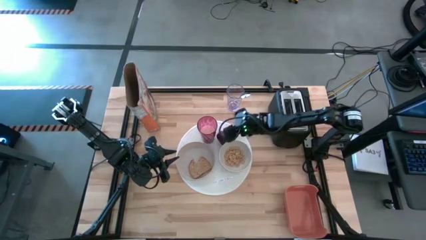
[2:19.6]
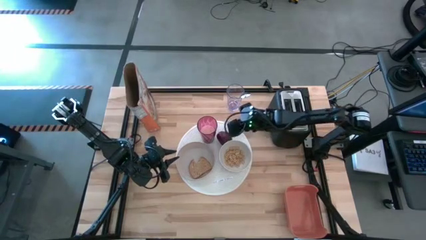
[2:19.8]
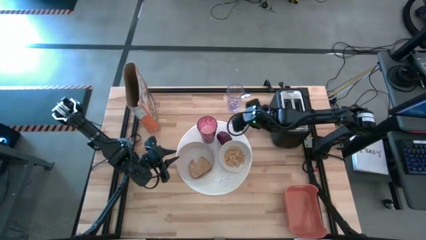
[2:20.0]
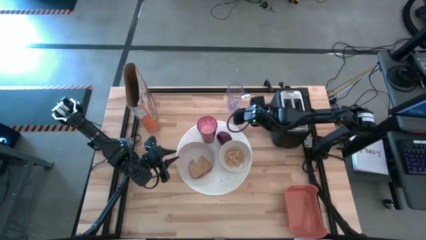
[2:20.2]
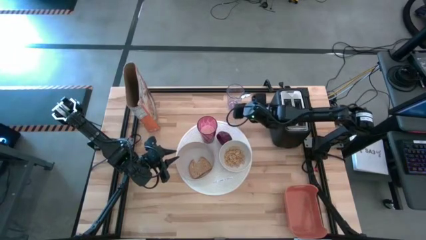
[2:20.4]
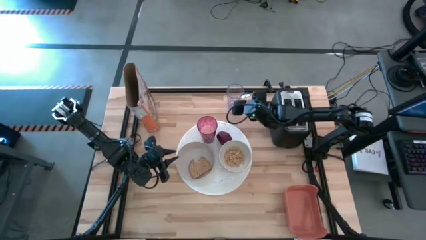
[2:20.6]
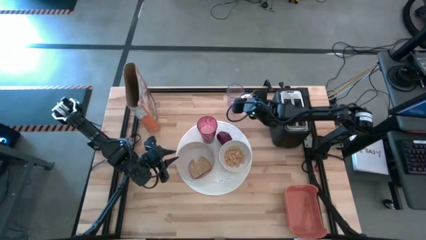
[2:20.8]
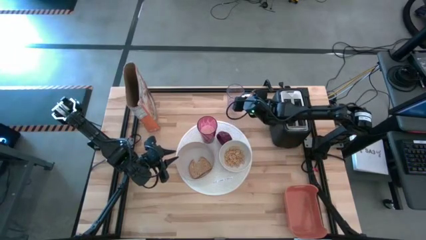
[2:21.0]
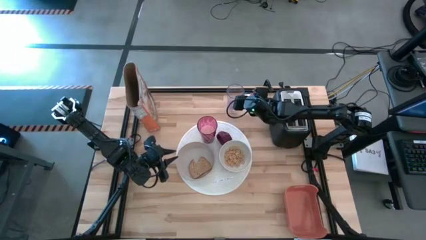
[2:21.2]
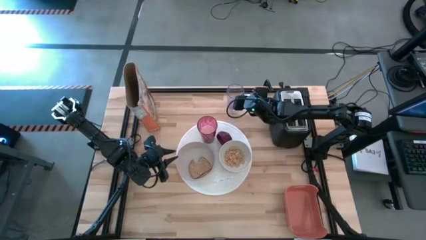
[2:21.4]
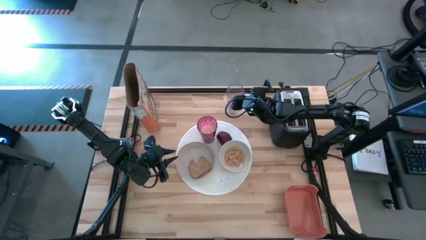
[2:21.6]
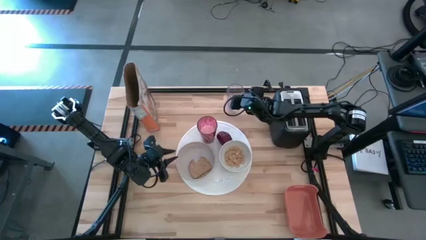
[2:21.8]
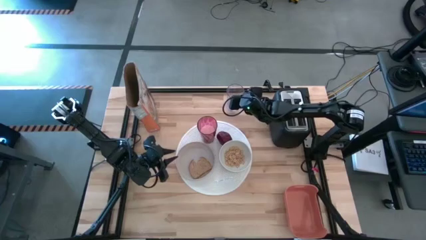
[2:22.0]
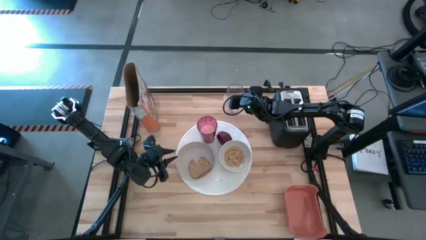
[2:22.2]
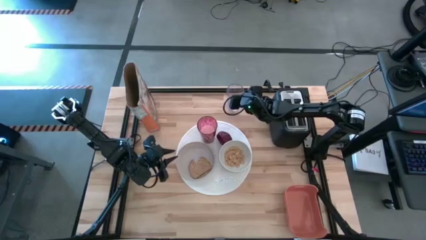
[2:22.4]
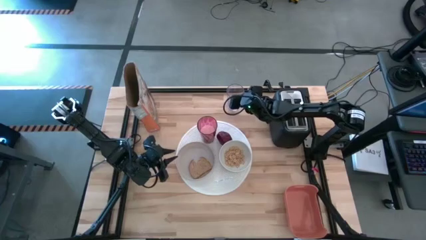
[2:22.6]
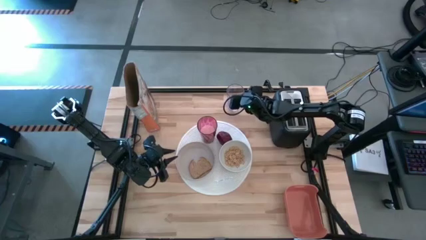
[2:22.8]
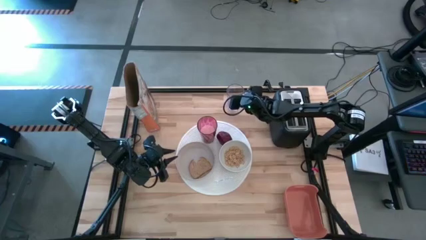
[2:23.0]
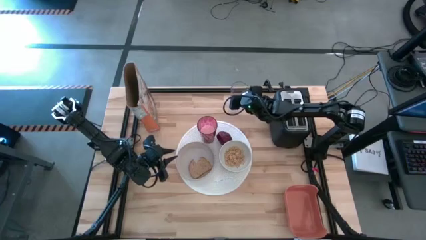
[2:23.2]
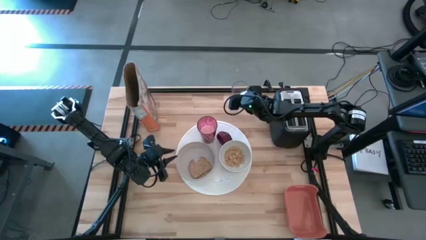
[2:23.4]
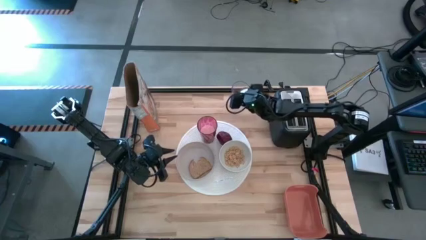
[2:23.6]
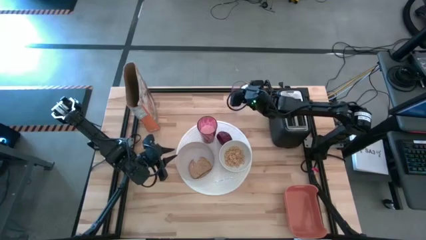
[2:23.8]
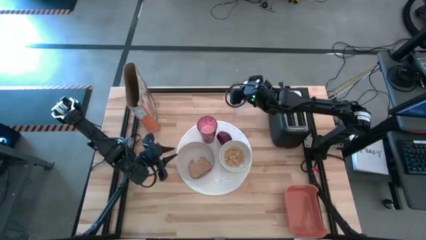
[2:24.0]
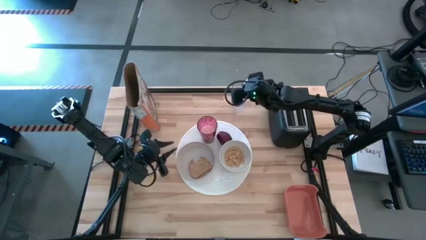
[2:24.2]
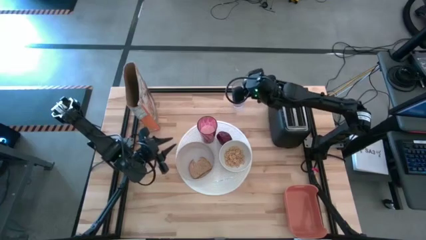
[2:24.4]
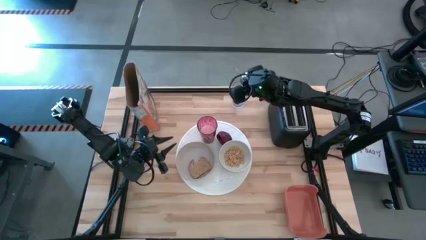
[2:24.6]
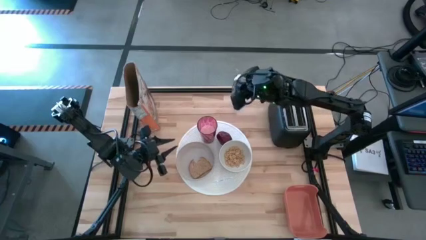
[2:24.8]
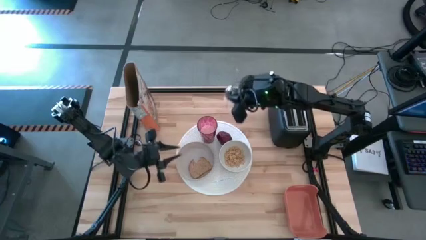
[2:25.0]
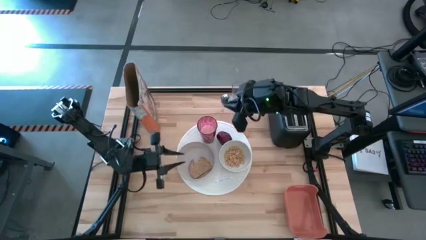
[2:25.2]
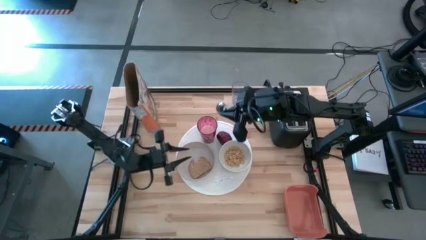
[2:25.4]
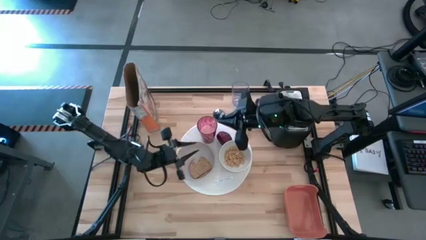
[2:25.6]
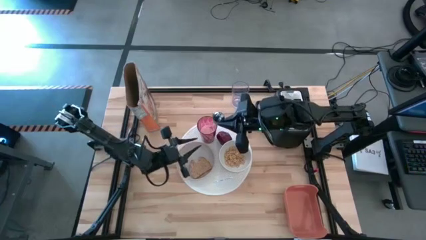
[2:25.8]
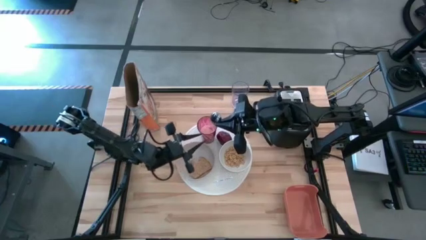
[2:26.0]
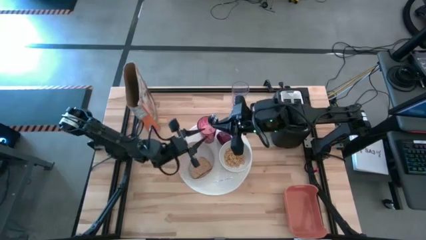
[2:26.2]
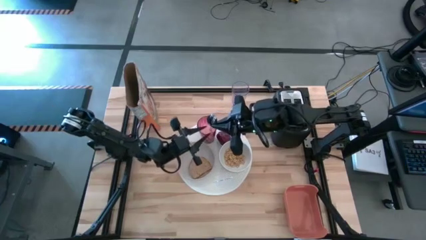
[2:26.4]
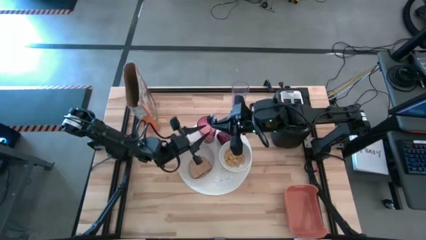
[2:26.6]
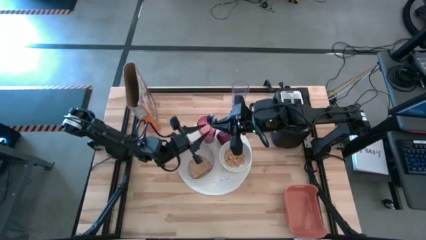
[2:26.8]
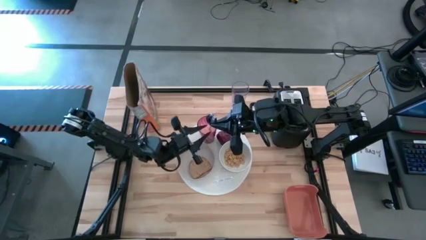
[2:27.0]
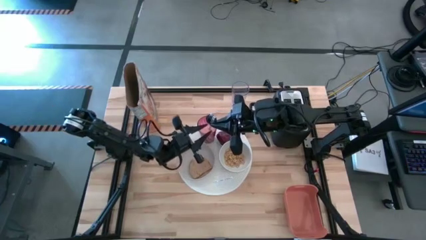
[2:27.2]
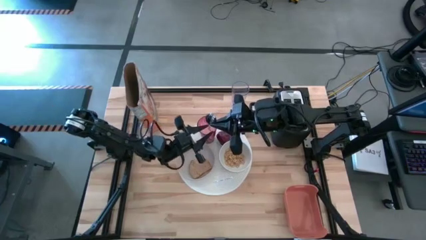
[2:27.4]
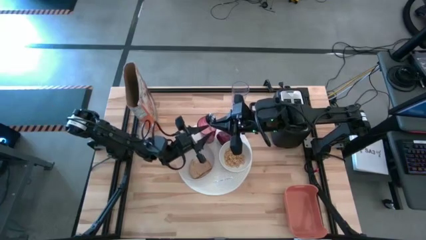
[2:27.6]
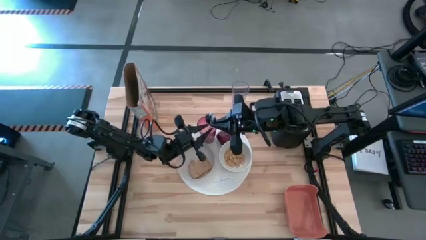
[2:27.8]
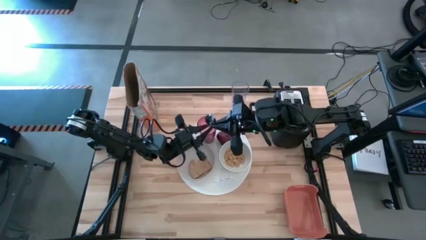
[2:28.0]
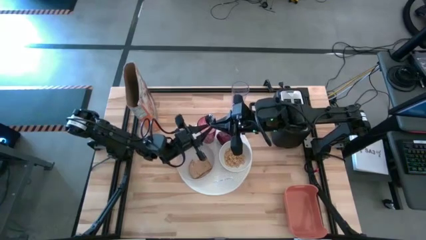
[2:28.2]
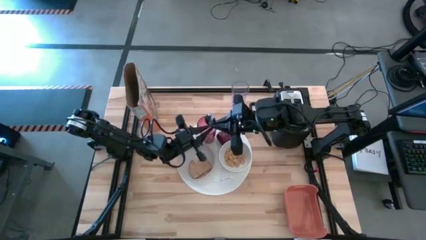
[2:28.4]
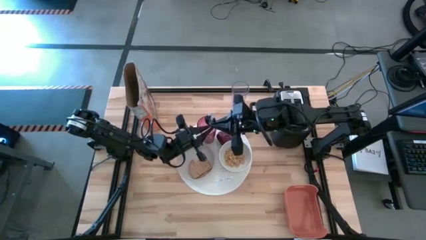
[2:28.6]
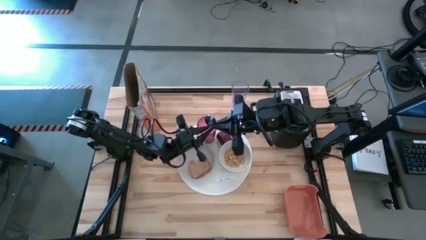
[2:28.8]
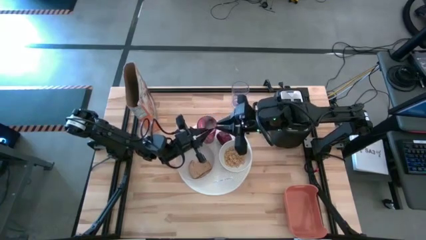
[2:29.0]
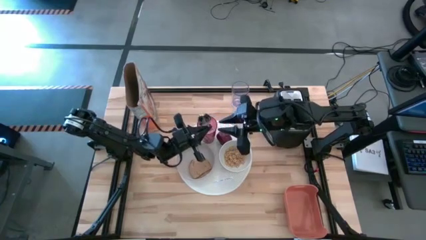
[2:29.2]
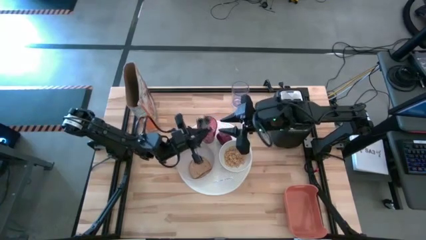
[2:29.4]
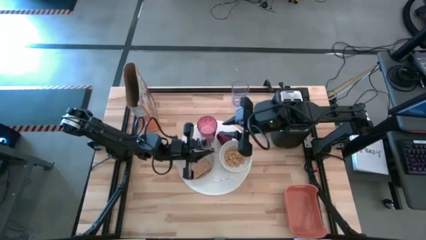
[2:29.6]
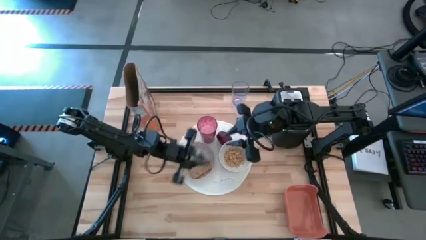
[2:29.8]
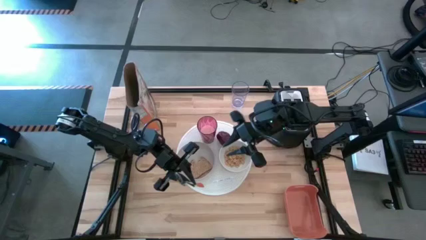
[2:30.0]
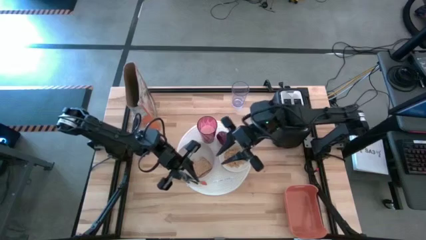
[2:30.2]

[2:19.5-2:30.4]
Task: Arrange a breakfast setting
Put the orange spoon on the table to the right side of the white bowl

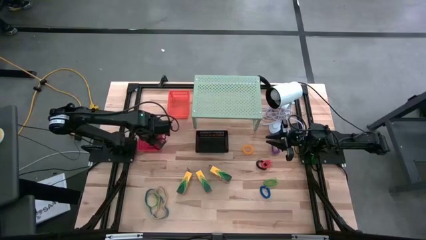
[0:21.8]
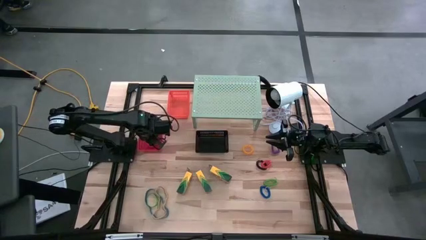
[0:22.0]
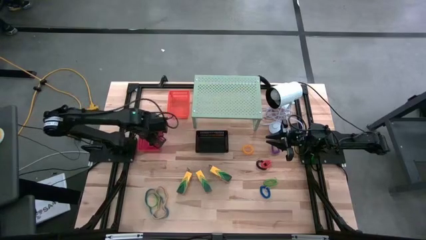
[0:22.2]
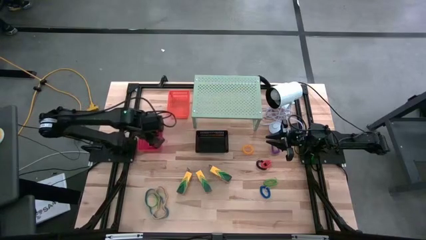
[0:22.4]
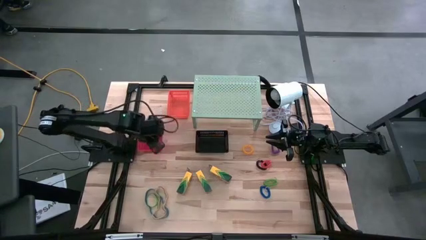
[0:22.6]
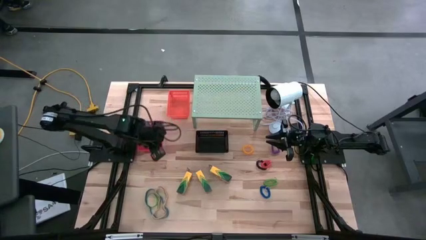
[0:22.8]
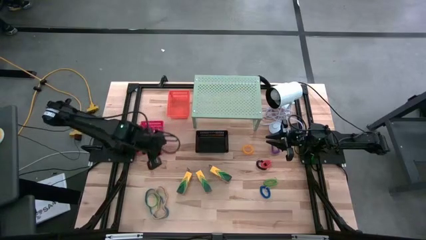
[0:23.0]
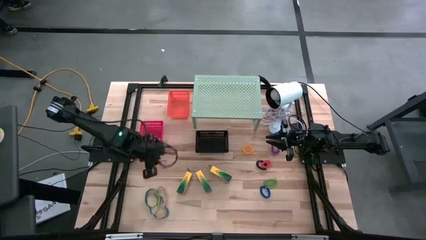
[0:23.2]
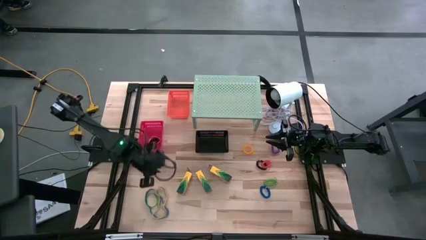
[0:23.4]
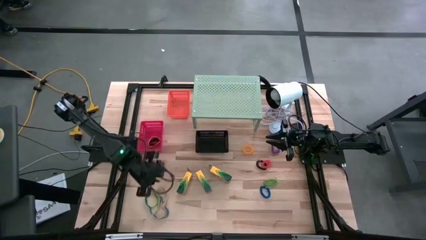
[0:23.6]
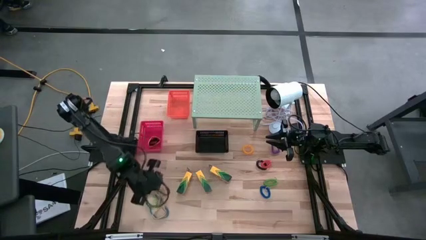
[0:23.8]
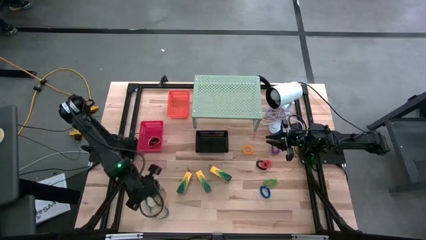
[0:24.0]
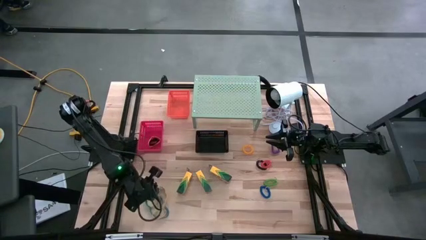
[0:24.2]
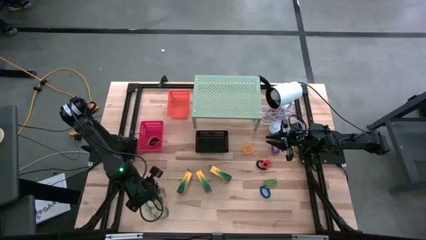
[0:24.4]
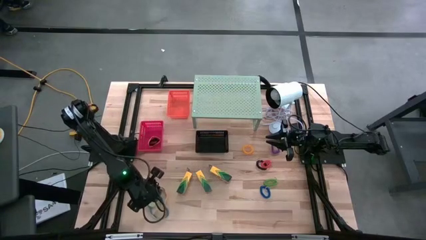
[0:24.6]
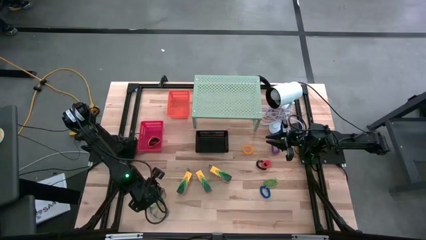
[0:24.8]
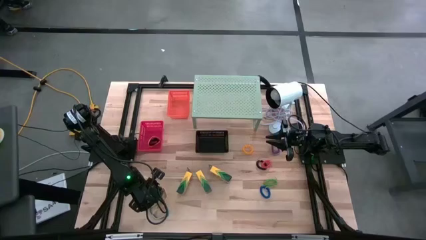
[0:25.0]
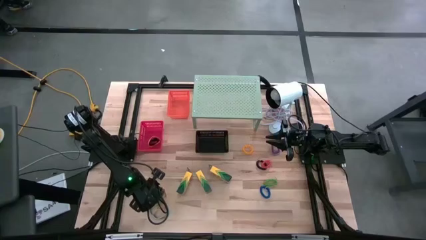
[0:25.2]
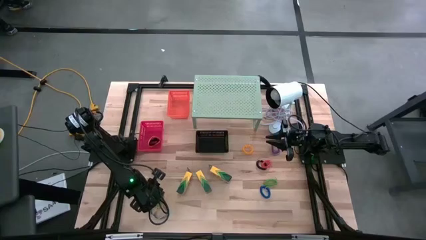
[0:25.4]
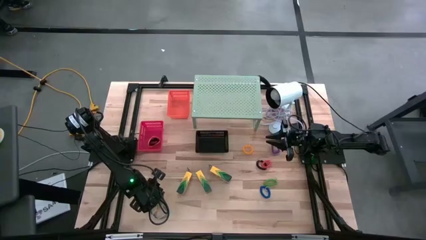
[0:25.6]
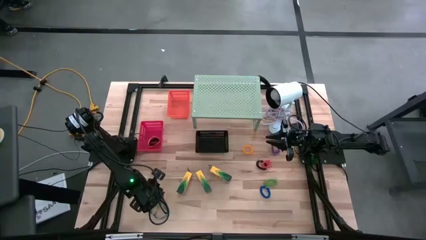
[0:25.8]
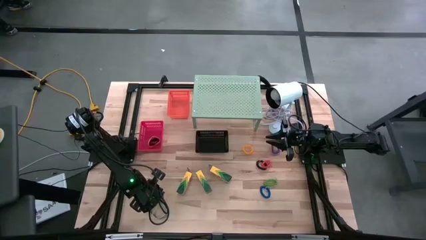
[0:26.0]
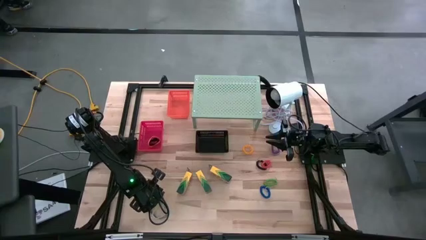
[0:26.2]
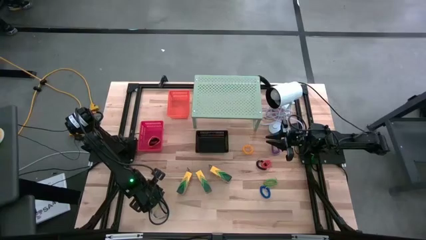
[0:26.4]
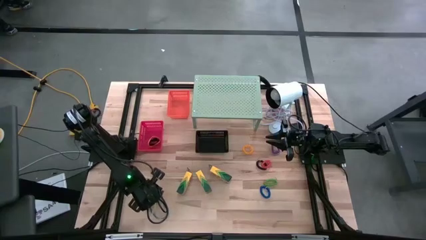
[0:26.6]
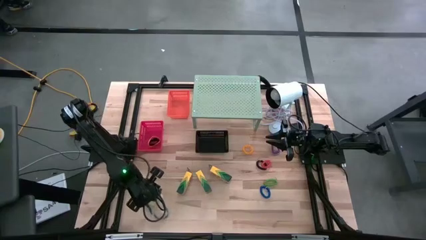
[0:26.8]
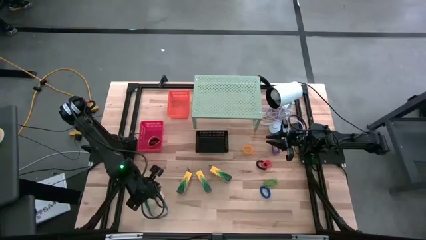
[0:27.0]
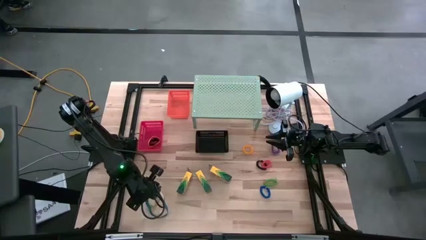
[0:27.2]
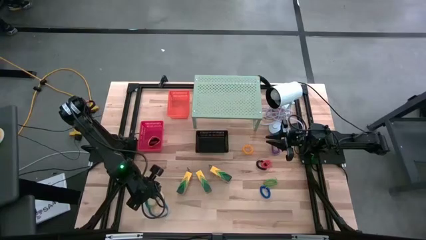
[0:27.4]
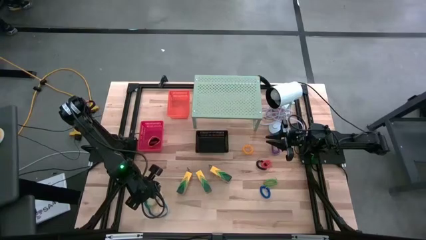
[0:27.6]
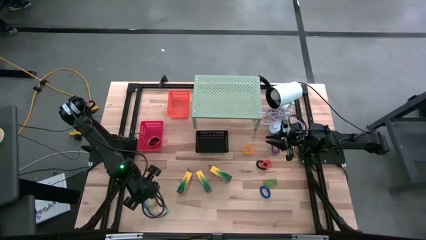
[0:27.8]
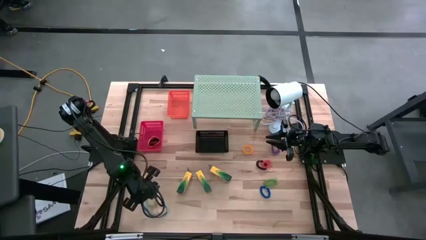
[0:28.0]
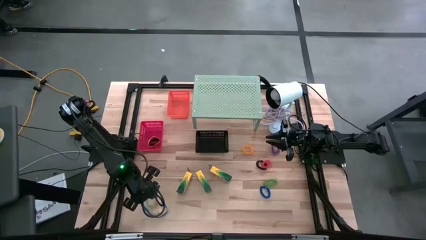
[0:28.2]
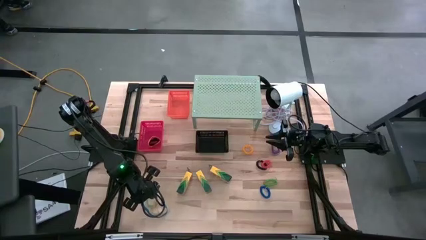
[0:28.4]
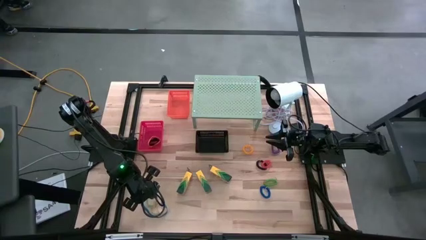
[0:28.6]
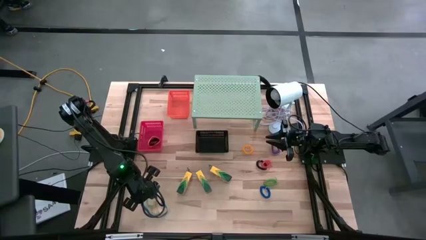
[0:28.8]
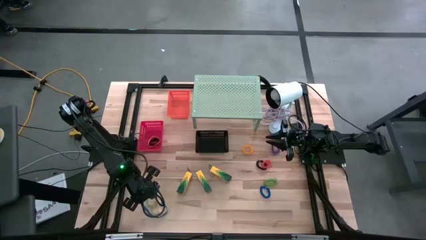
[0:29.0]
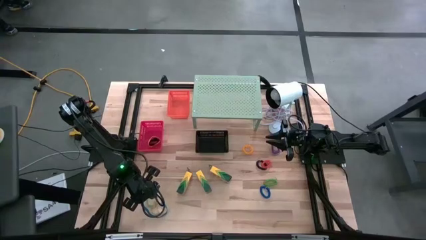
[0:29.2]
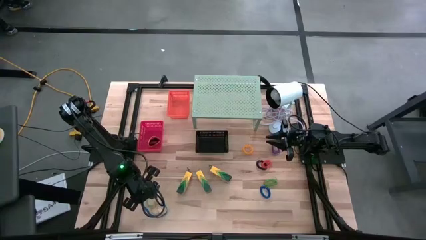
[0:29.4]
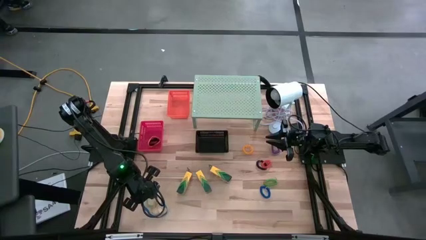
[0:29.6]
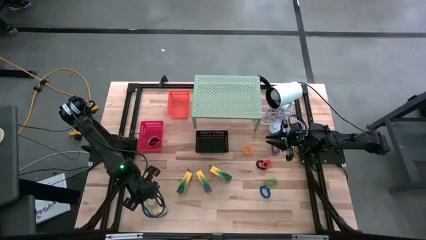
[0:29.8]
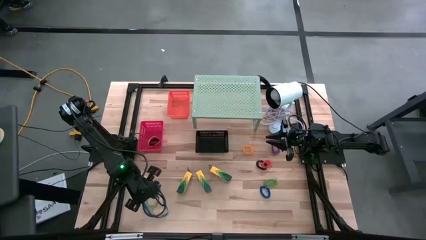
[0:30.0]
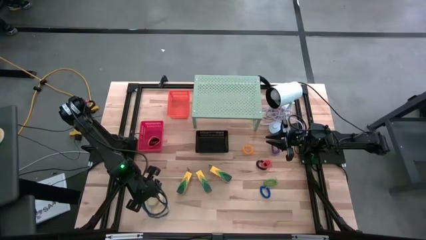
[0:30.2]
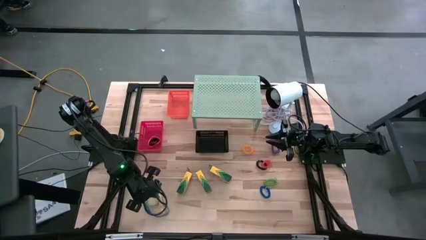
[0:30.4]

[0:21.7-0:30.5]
Task: Pick & Place Office Desk Supplies
Put the white rubber band into the orange bin on the shelf
